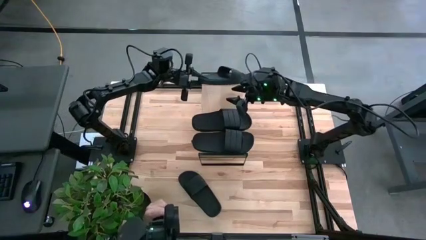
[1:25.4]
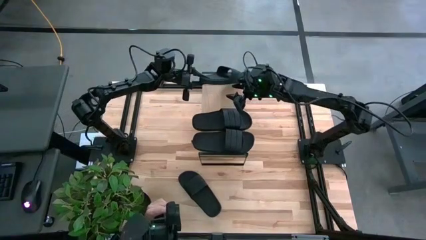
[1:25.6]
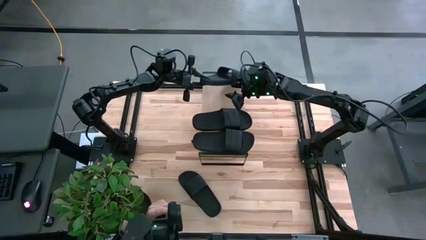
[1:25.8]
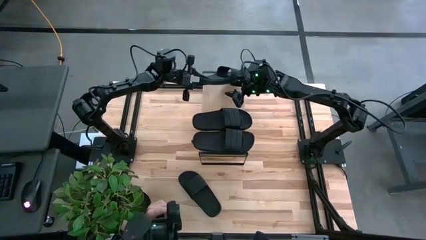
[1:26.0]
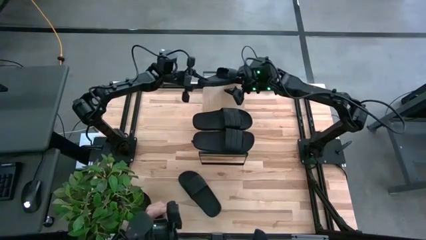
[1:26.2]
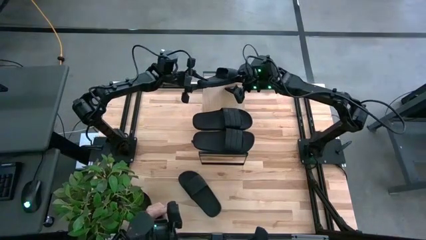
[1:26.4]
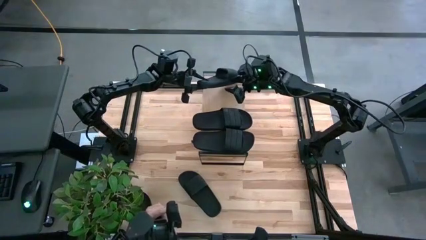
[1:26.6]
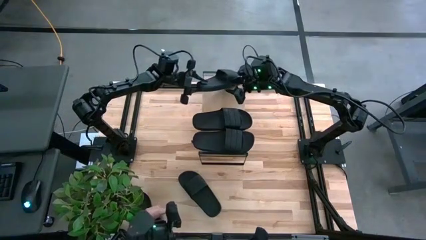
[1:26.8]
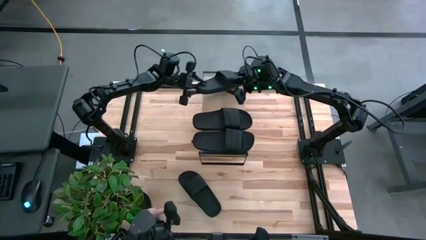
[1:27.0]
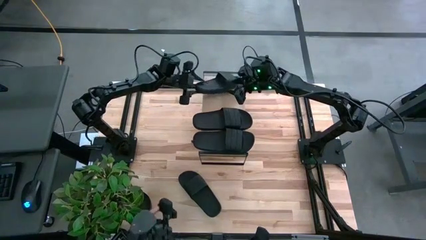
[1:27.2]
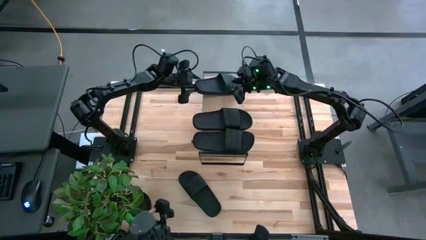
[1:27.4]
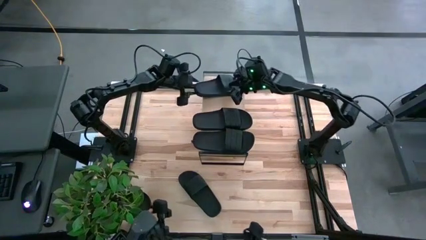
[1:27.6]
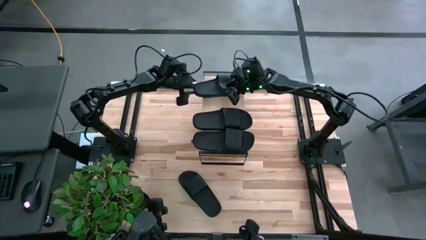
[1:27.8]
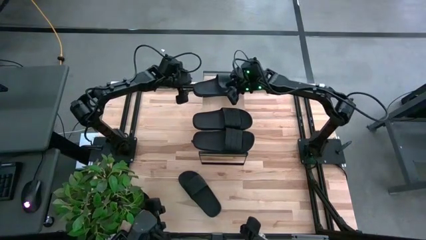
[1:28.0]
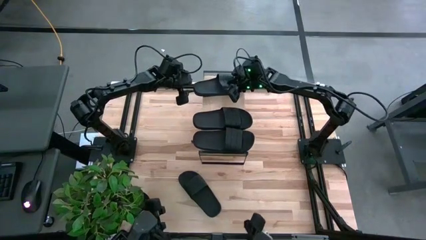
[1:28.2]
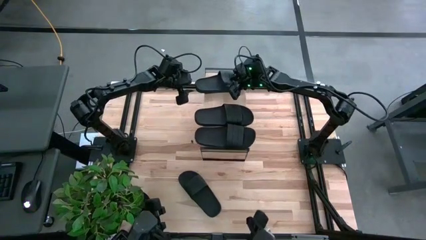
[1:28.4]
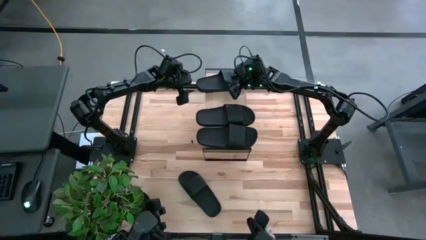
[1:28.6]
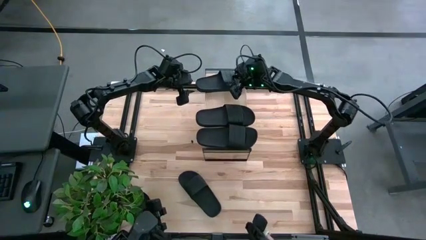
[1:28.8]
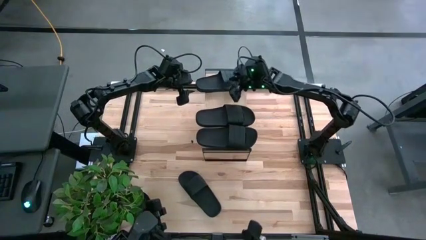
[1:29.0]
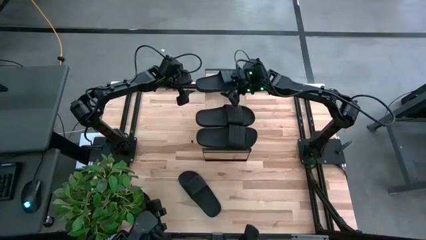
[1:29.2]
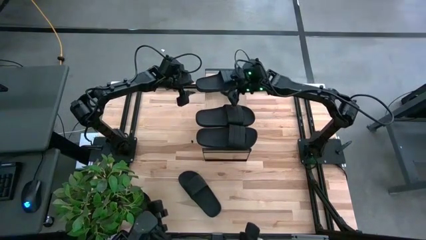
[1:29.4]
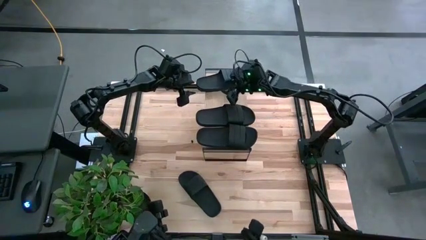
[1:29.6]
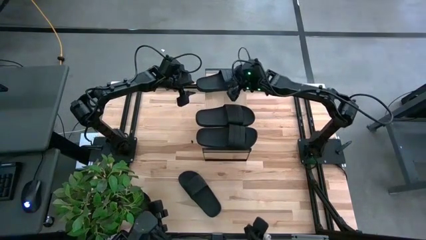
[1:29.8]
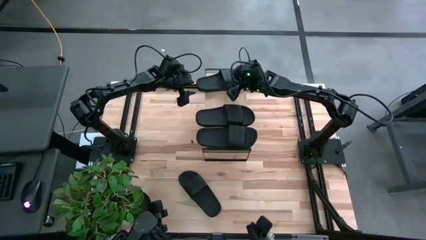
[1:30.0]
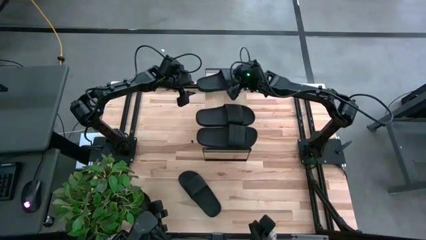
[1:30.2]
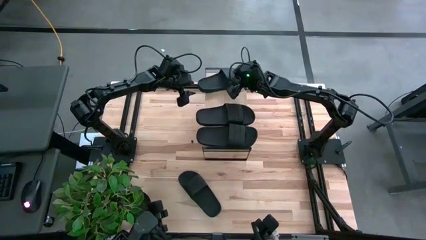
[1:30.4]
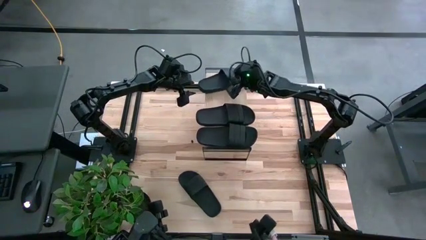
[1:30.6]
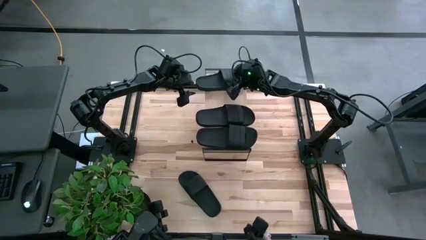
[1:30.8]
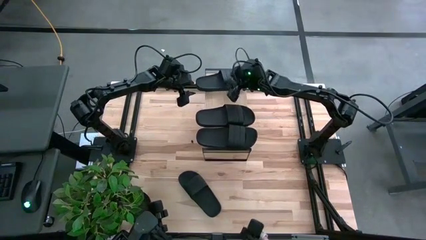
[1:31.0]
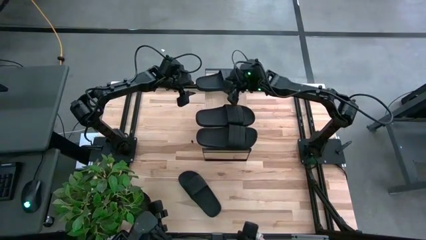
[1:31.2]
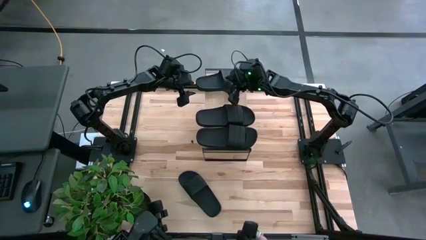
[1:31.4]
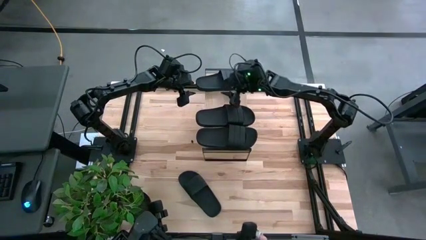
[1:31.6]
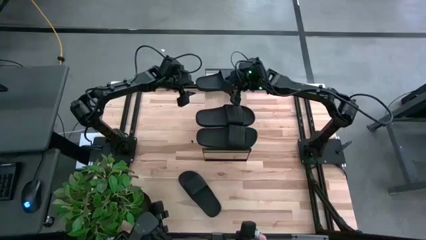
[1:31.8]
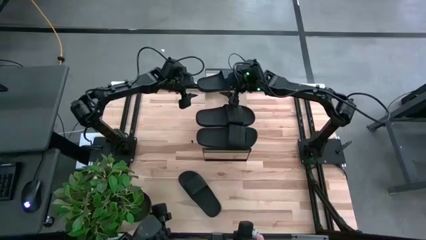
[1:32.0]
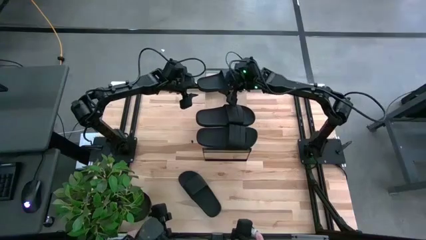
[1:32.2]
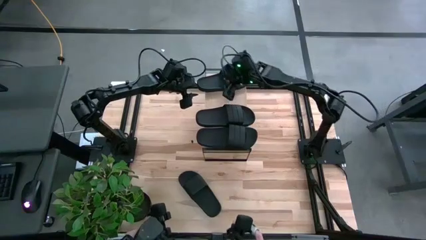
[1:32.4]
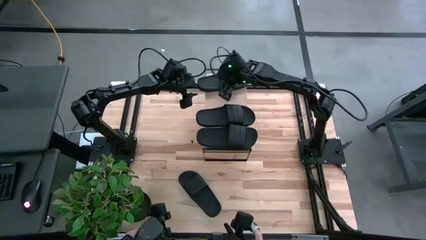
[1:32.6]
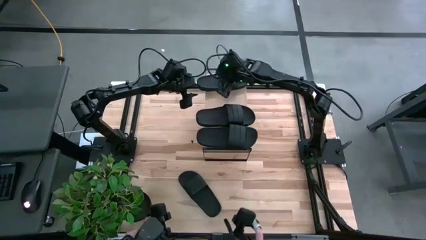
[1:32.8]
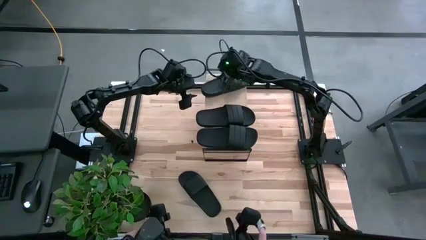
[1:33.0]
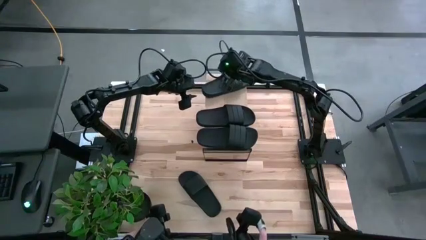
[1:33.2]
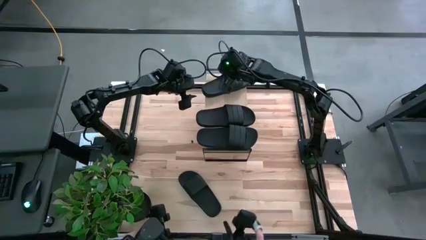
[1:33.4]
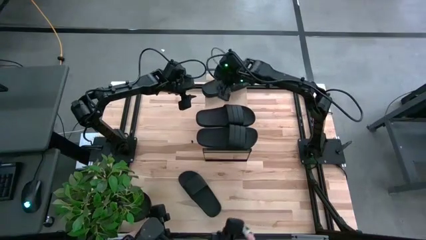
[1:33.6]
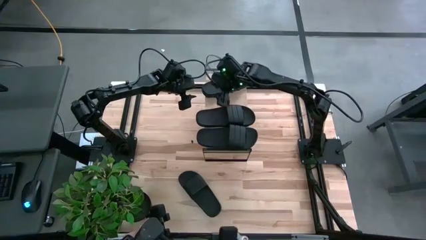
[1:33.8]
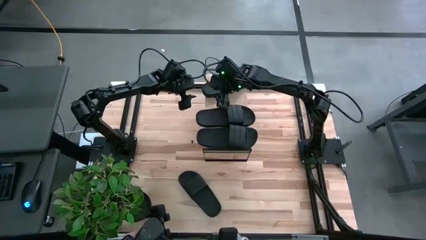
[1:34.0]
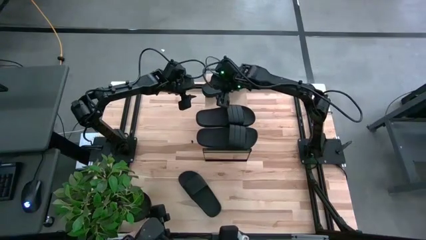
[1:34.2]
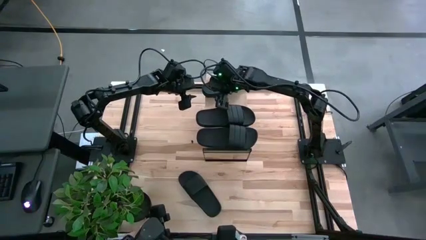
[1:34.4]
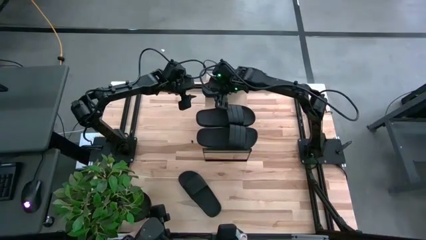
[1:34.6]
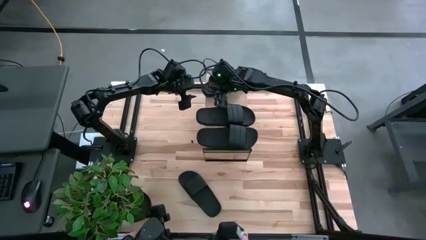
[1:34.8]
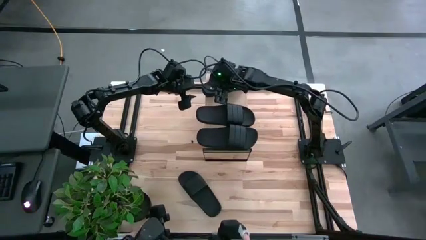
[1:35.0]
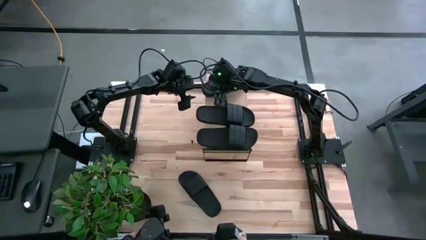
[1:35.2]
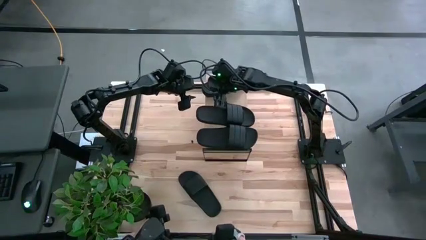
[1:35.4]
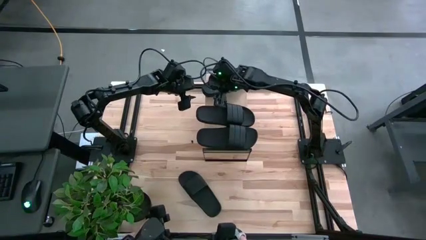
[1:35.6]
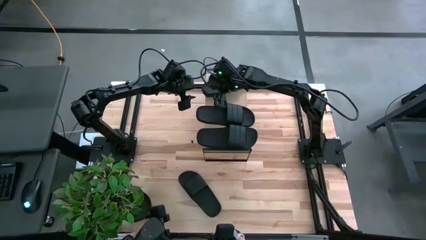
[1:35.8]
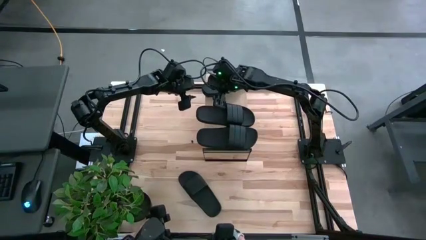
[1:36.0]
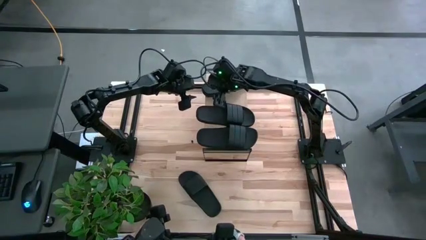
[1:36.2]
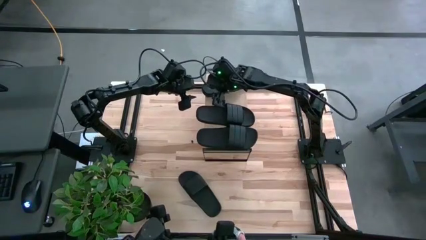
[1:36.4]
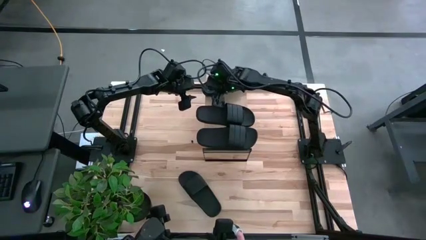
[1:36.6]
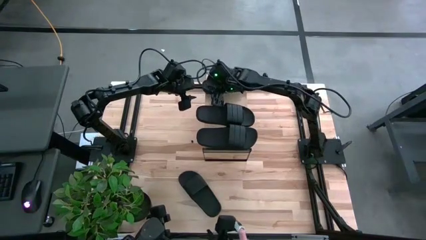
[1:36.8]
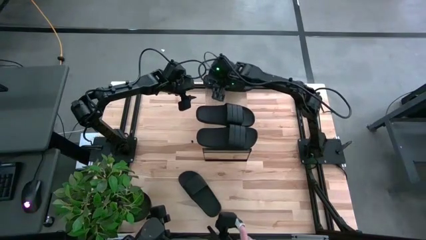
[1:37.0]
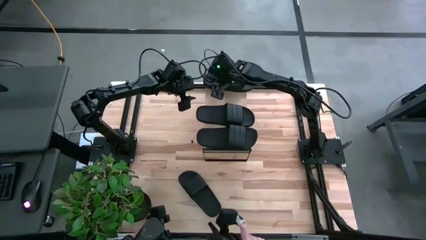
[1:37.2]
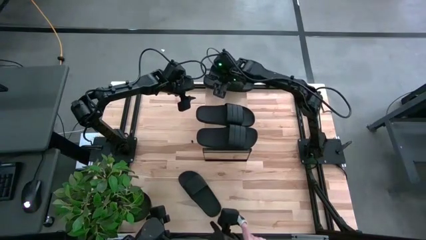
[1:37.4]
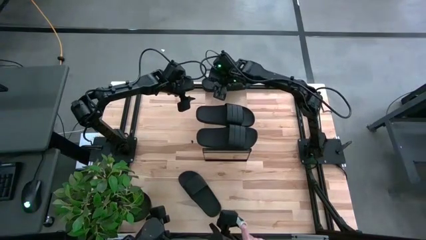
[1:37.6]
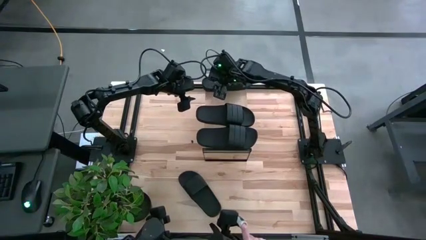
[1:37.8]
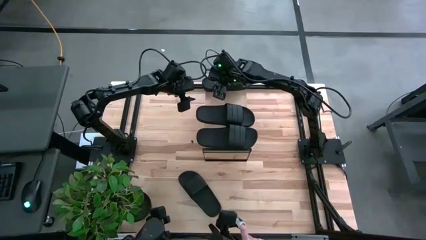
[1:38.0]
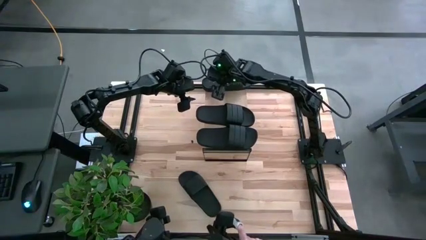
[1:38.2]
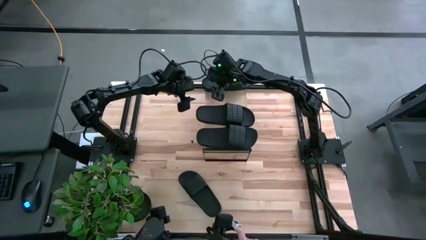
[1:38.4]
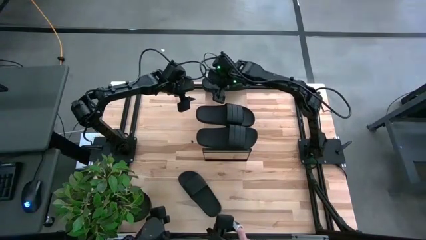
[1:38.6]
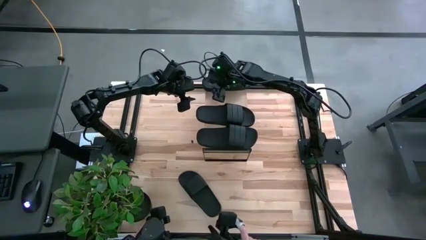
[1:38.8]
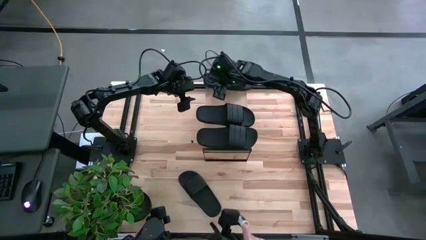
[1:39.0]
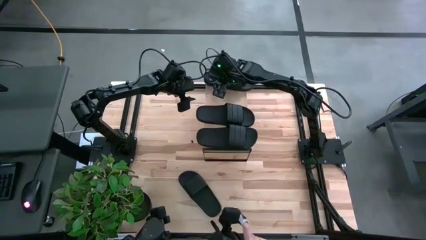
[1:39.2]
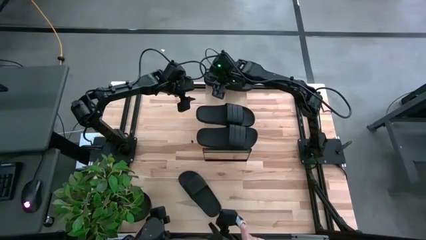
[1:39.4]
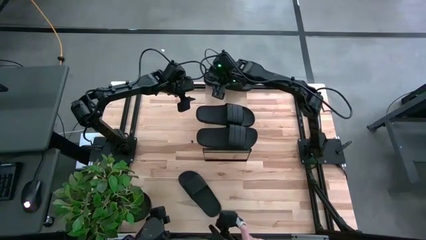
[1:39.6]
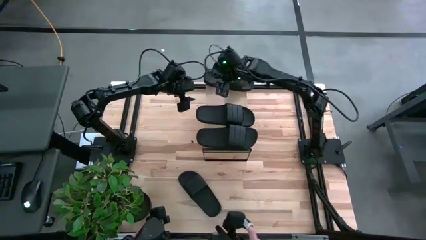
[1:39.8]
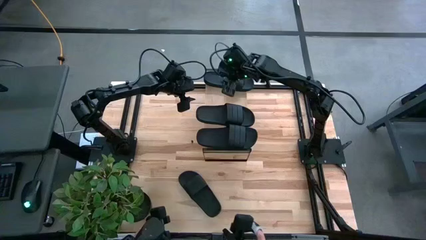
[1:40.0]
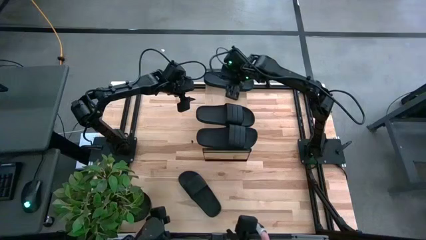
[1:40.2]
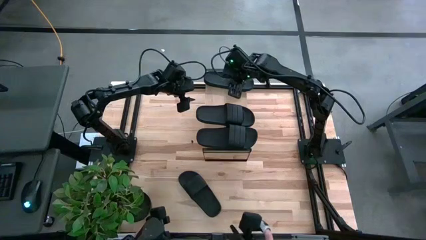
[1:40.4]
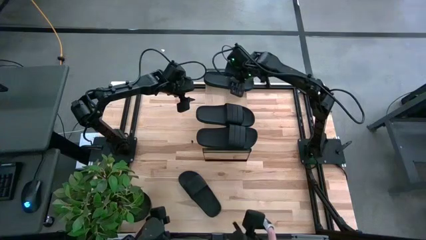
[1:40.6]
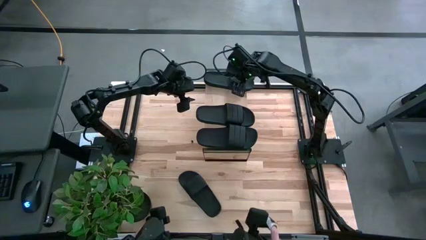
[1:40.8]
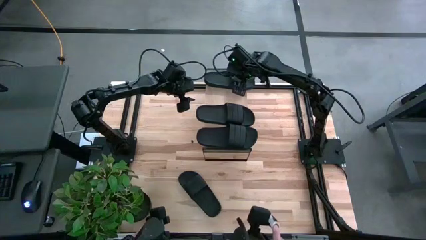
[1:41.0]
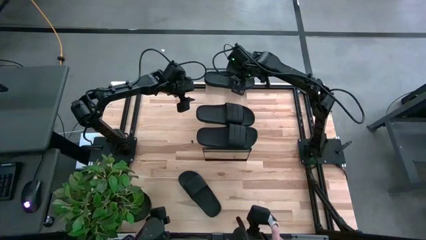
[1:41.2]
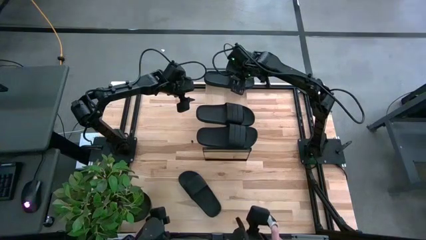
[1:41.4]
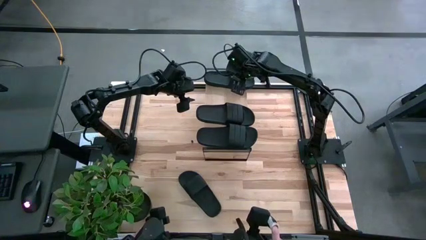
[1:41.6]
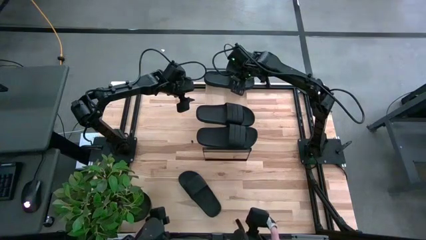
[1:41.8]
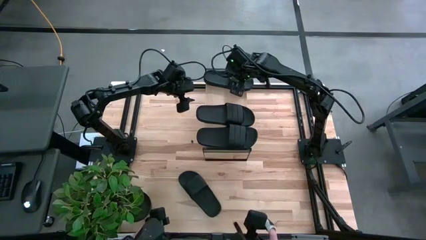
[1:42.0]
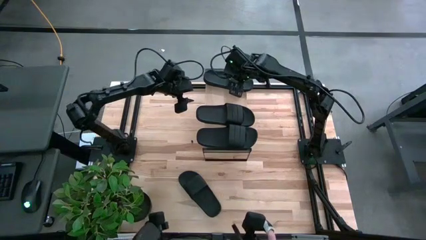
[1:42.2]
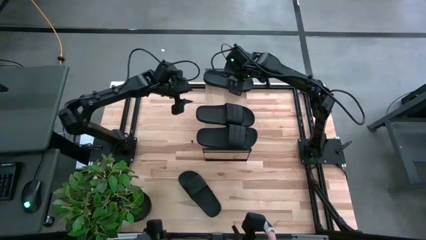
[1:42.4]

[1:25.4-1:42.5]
Task: Pick and place slides into the shelf
Put the black slipper on the shelf
